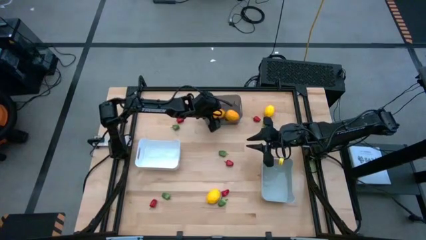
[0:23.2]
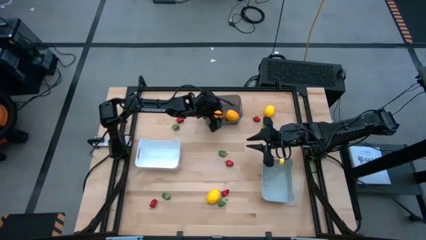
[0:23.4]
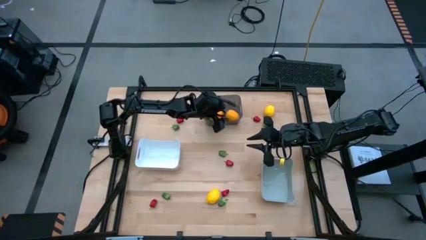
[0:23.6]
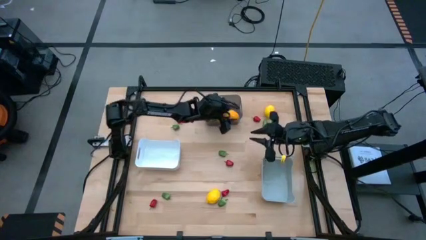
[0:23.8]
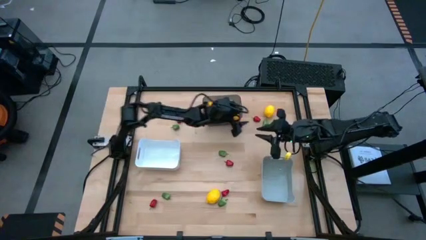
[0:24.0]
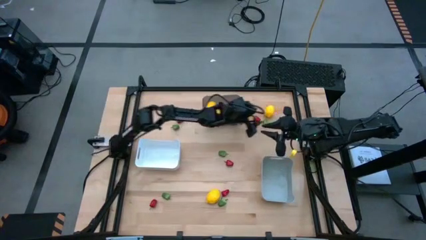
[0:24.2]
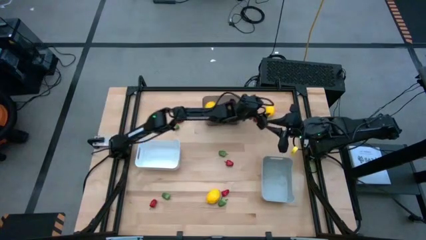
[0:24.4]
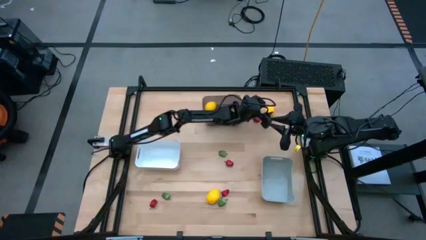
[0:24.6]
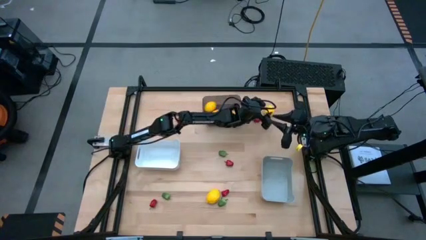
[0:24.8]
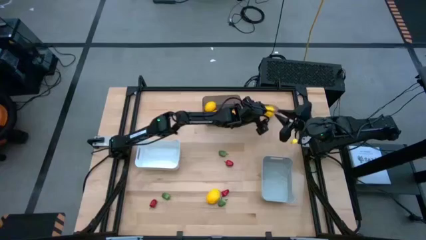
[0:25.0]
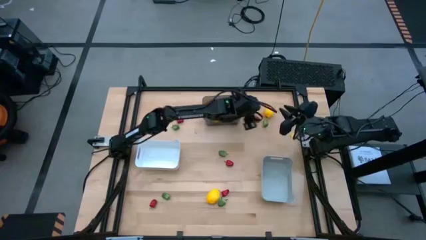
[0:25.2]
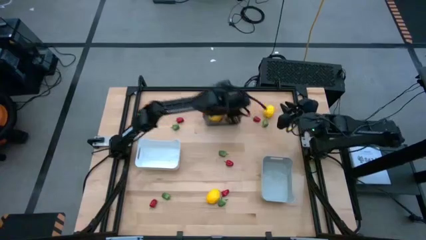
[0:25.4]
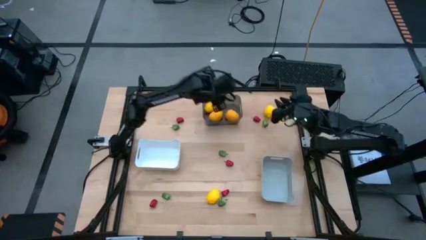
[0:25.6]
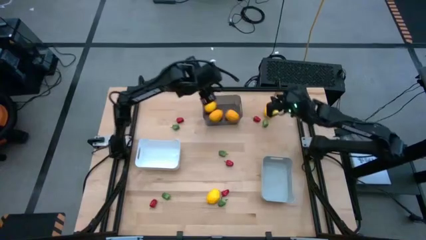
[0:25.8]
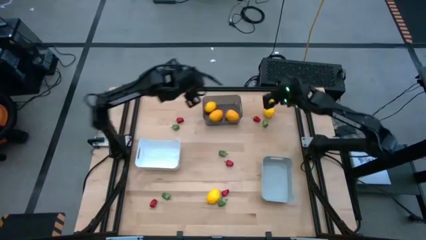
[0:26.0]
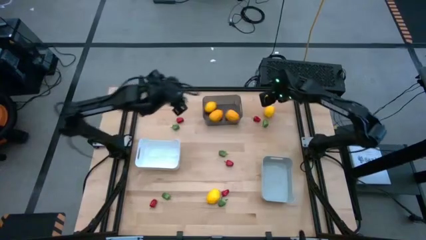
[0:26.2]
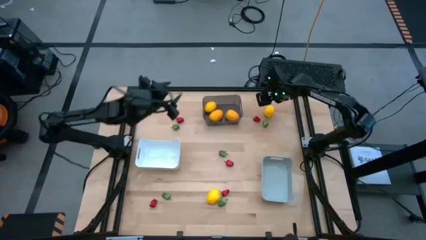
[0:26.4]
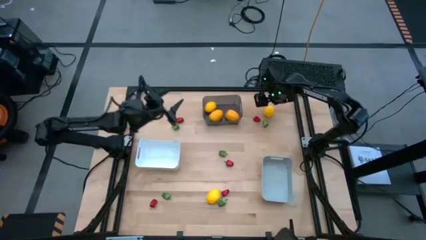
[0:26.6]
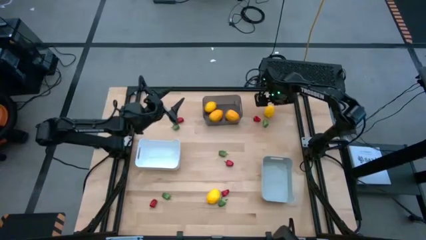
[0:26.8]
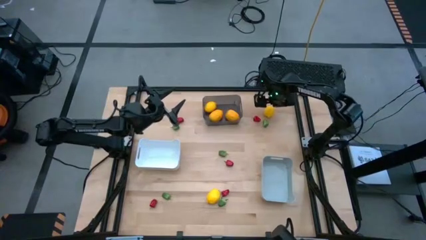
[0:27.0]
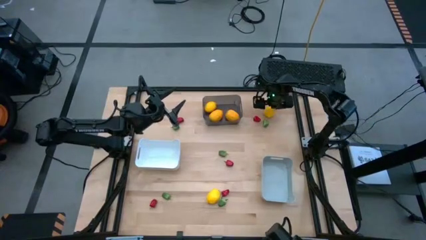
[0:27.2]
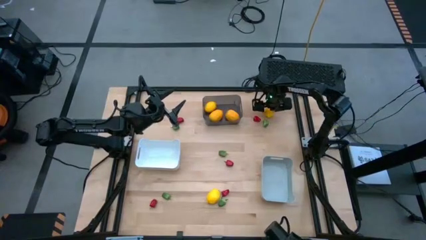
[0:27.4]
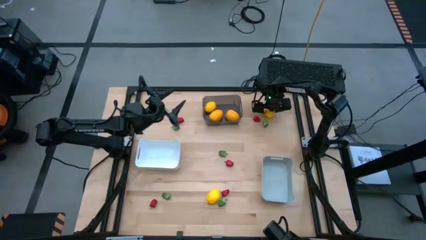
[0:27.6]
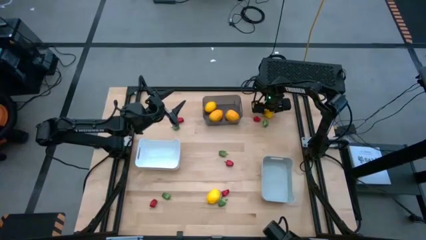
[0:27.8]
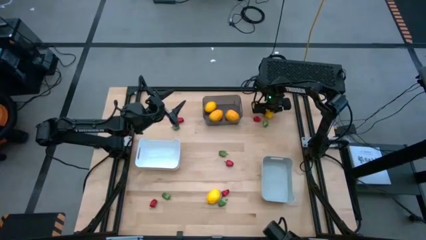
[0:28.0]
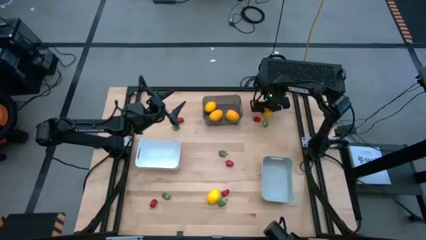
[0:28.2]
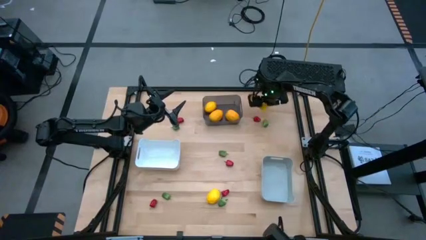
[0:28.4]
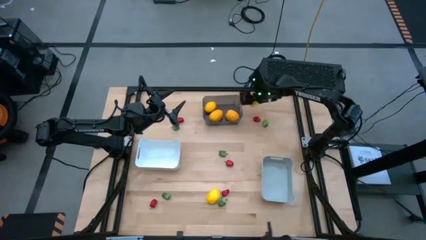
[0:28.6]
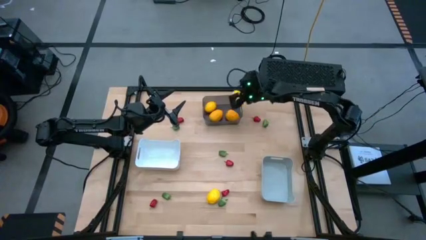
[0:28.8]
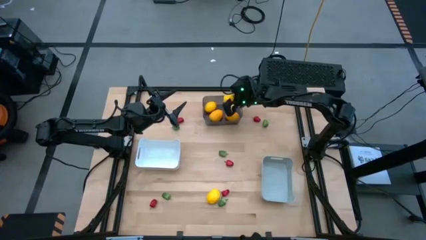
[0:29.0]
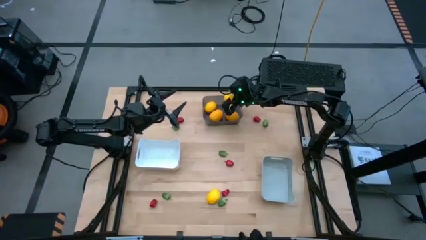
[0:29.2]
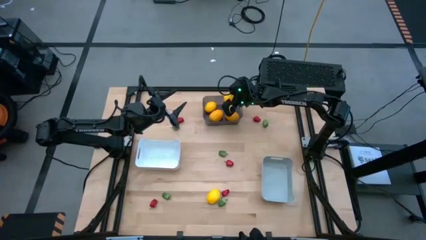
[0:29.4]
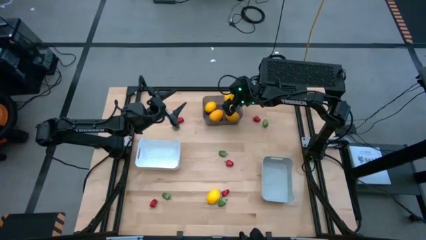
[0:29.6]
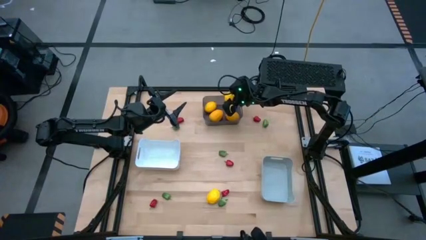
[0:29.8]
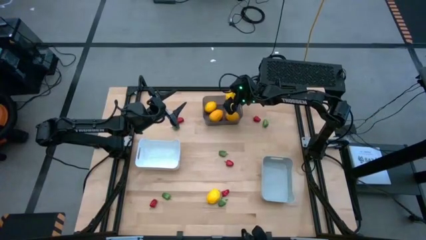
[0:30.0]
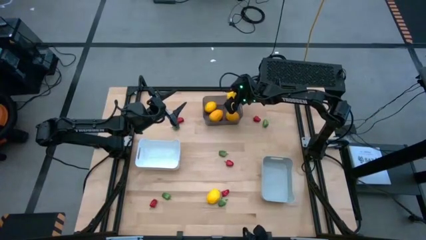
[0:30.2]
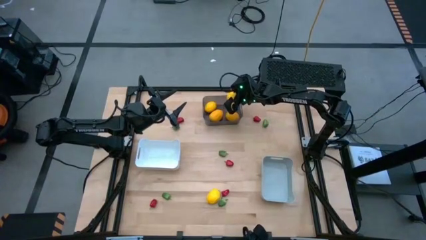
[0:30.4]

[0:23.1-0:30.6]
Task: Sort produce into baskets
Put the yellow lemon into the black bin

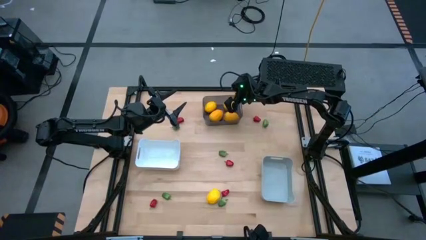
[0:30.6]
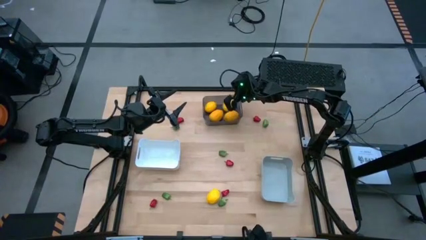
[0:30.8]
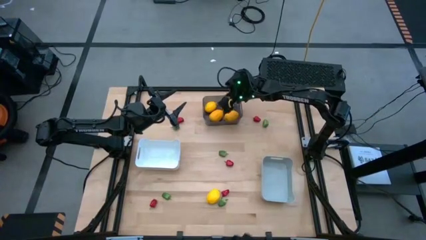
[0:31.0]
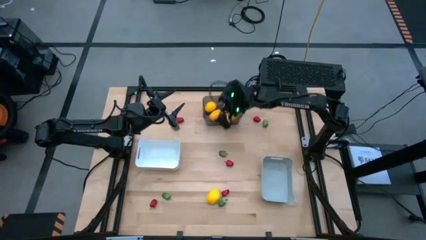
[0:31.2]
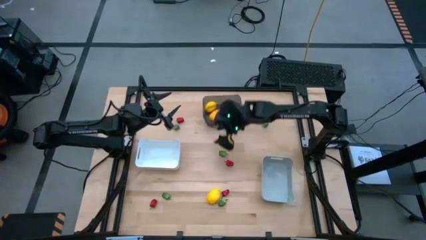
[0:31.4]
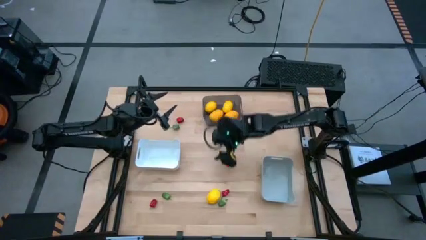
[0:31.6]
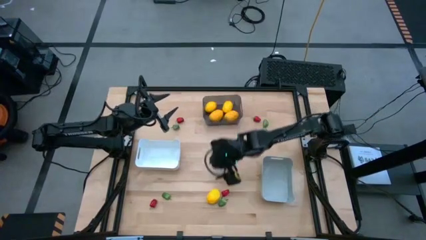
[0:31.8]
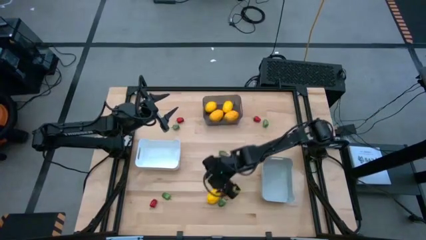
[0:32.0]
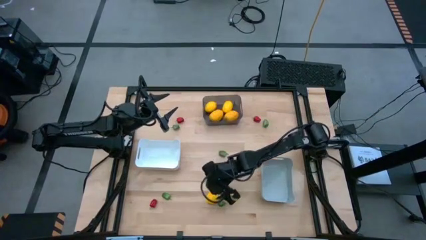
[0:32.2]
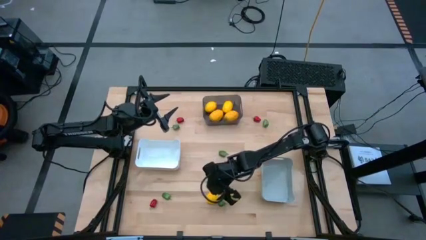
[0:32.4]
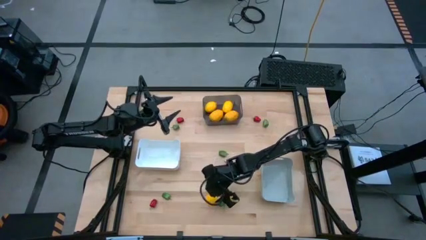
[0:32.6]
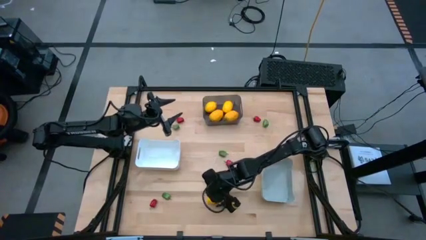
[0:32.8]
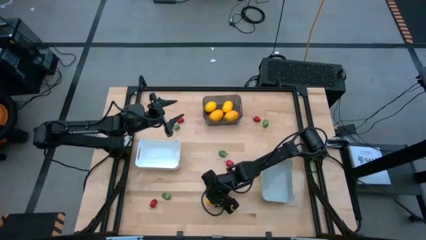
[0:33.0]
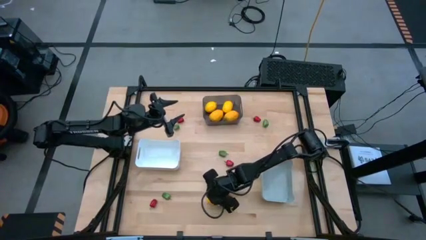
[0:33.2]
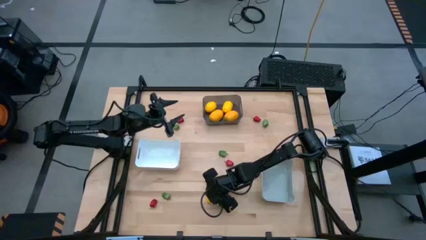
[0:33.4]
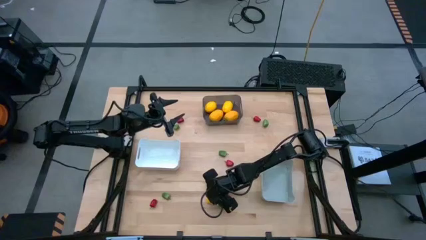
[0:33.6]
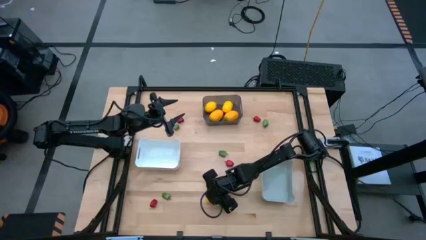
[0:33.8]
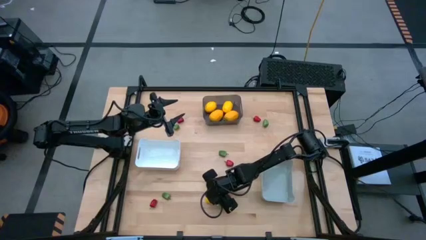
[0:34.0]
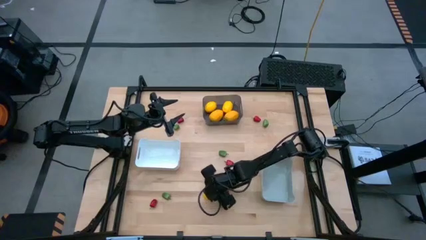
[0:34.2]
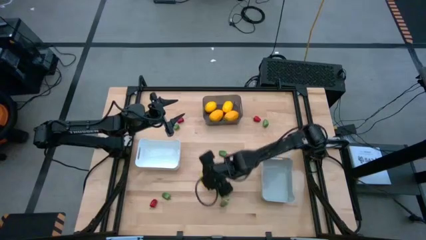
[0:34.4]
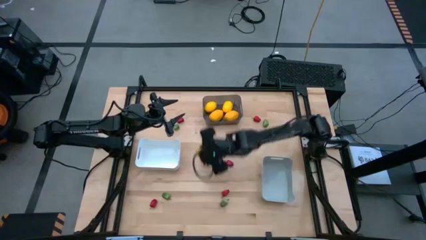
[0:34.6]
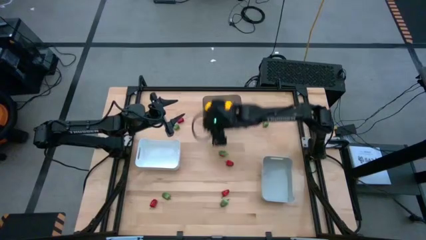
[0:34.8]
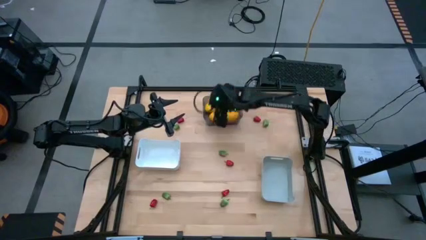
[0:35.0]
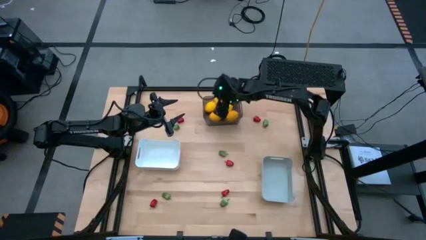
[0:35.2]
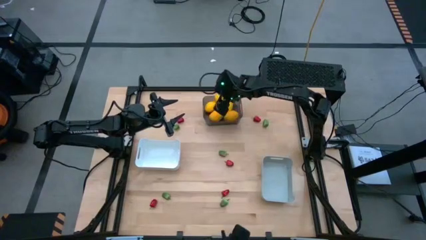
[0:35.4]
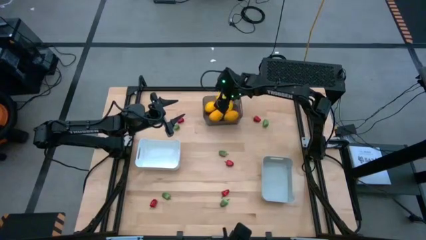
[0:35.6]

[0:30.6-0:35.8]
Put the yellow lemon into the black bin

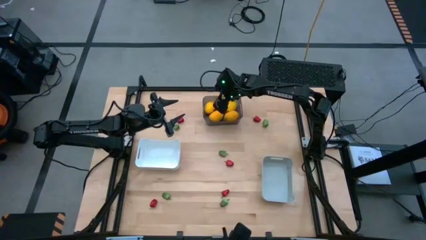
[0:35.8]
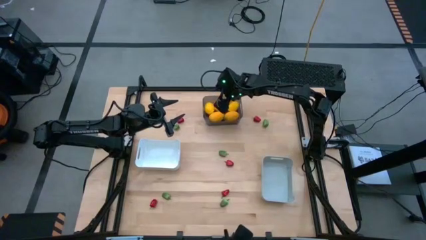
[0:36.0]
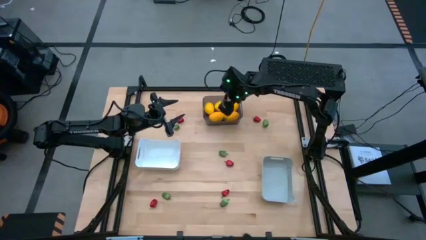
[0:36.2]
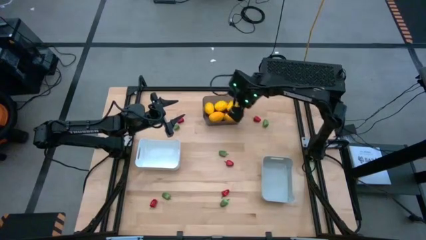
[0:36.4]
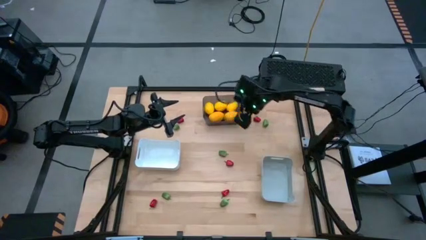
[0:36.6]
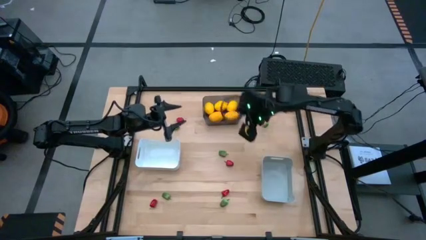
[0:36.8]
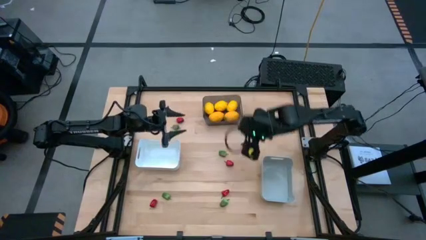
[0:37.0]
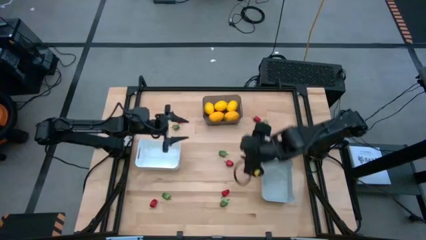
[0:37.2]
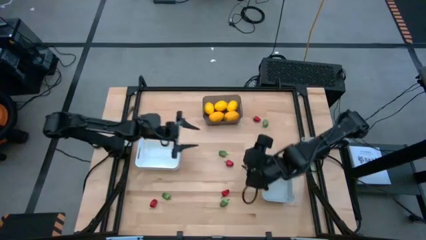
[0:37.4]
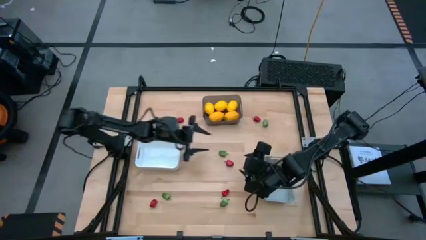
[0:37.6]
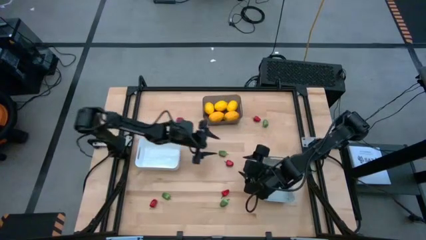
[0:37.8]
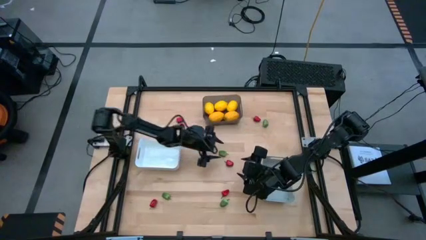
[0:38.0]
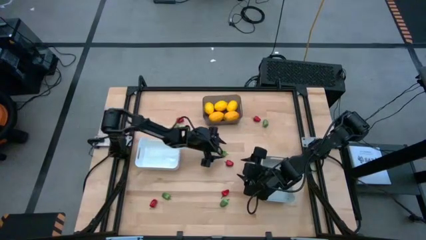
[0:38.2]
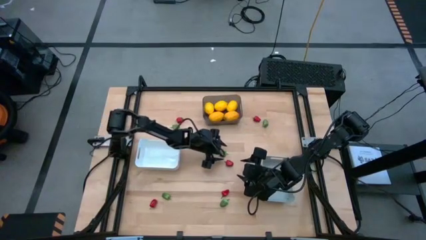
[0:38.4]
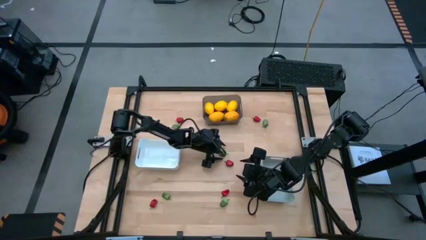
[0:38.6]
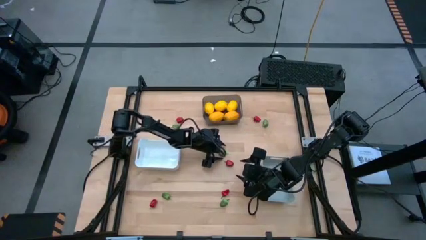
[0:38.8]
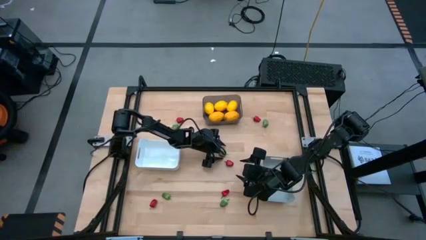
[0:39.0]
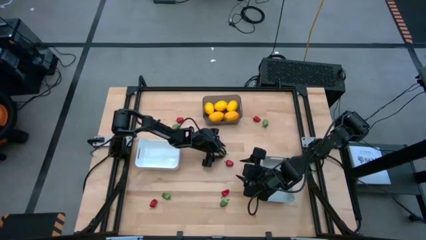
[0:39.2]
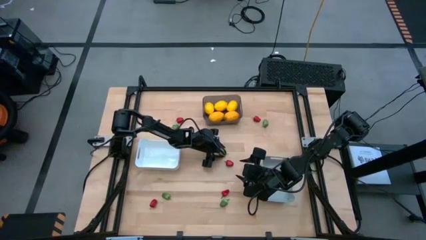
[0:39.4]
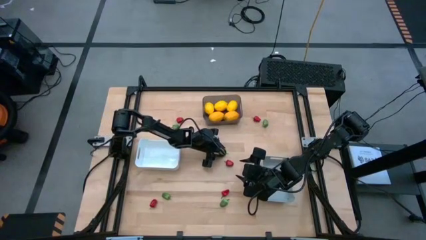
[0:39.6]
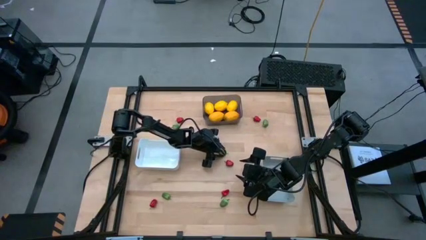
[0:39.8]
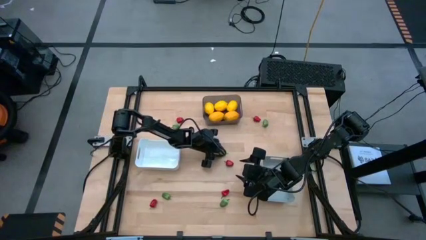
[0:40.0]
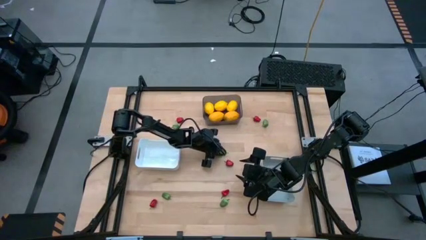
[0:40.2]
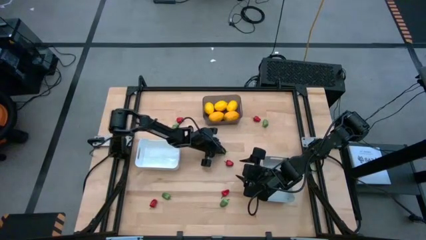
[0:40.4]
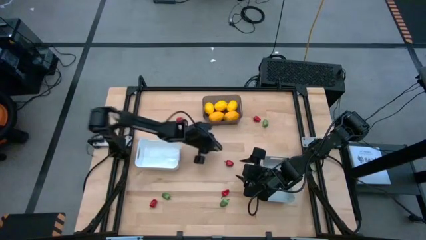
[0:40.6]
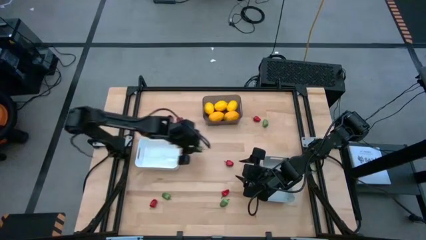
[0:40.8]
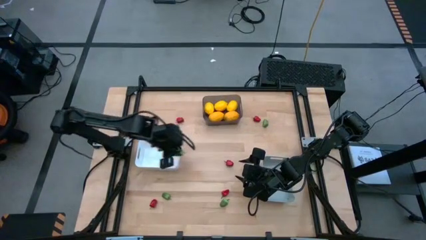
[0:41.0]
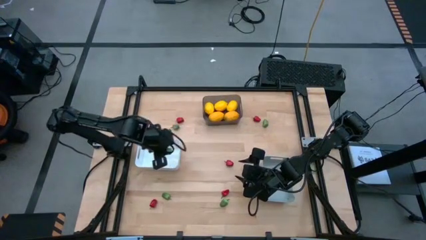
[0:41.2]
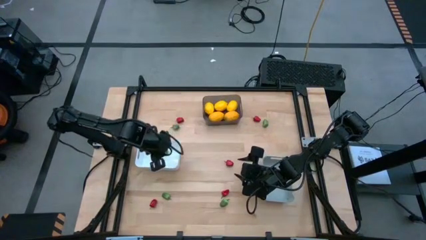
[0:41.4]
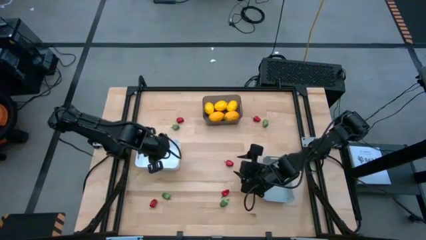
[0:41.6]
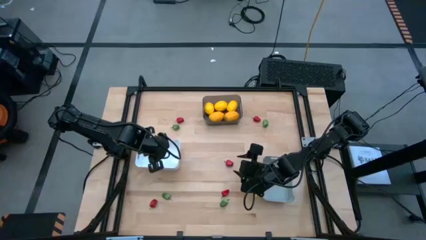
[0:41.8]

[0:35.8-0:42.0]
Put the green bell pepper into the white bin
